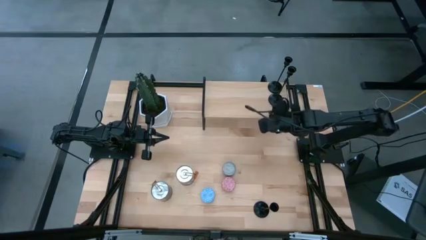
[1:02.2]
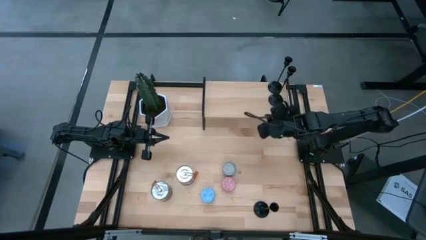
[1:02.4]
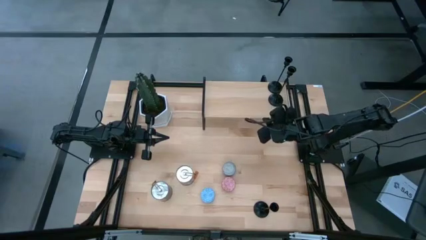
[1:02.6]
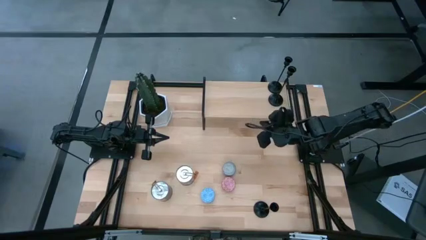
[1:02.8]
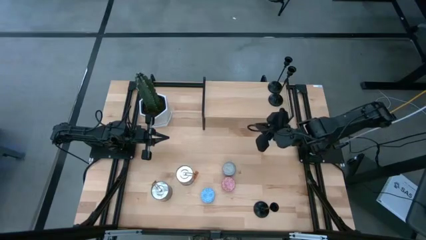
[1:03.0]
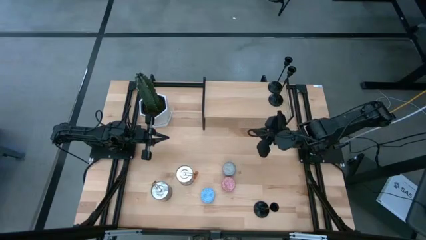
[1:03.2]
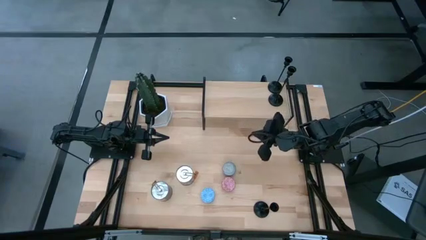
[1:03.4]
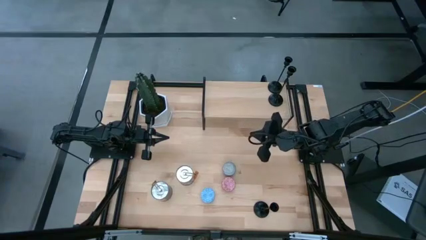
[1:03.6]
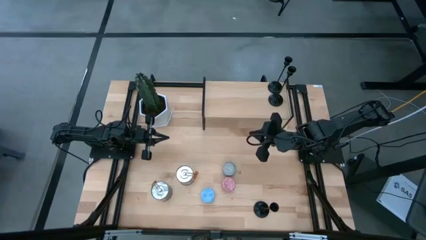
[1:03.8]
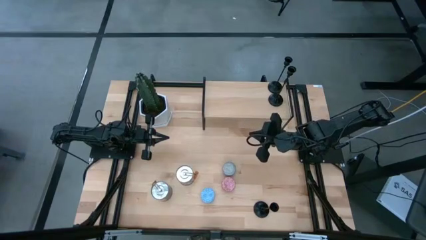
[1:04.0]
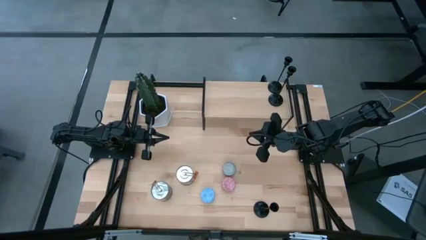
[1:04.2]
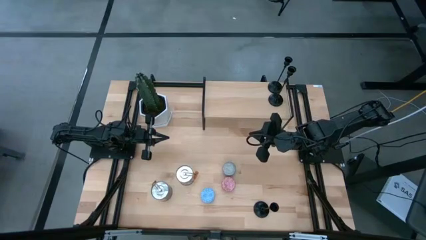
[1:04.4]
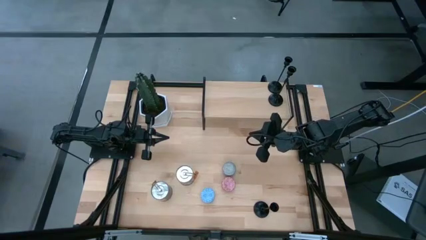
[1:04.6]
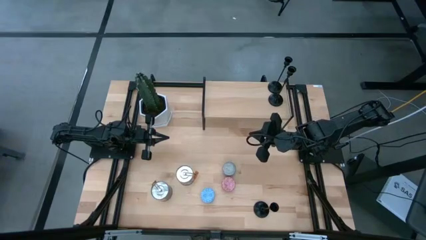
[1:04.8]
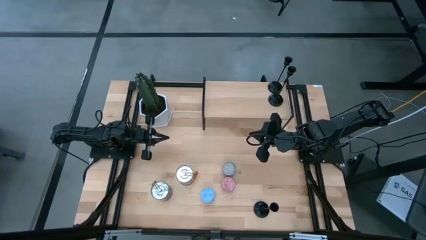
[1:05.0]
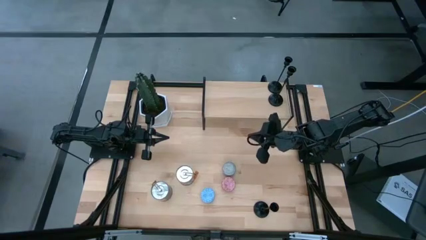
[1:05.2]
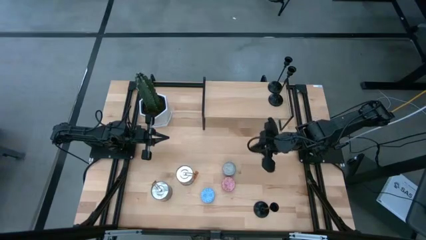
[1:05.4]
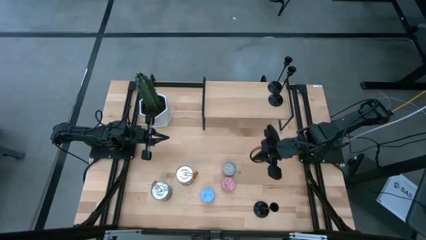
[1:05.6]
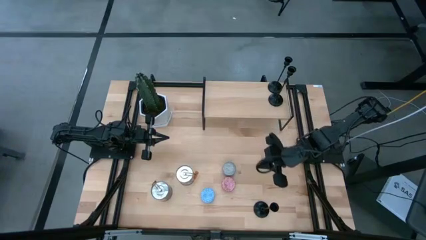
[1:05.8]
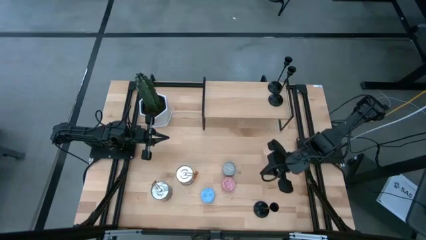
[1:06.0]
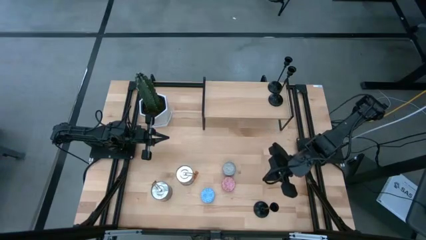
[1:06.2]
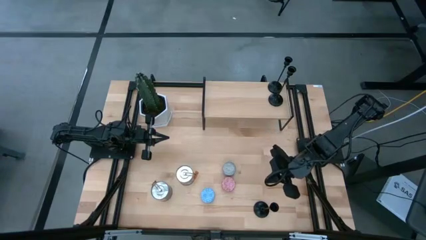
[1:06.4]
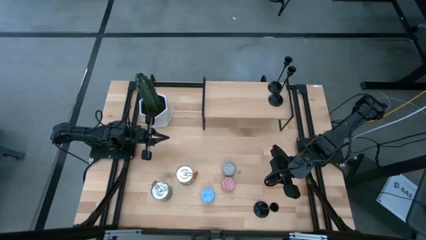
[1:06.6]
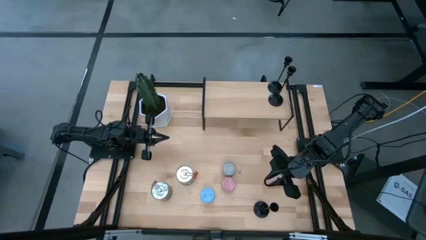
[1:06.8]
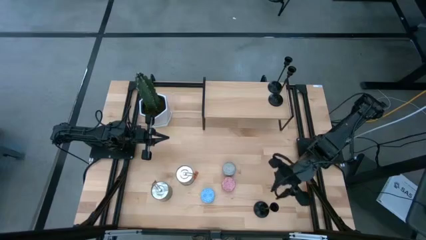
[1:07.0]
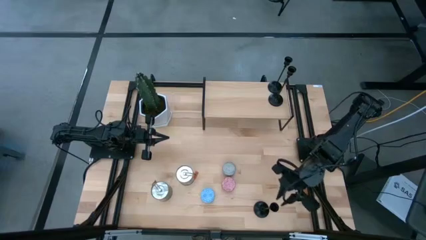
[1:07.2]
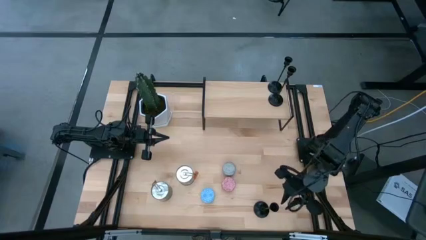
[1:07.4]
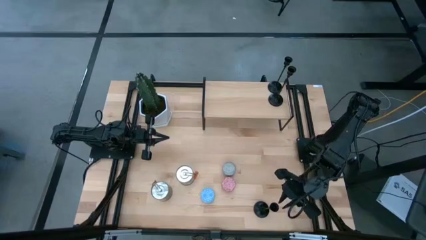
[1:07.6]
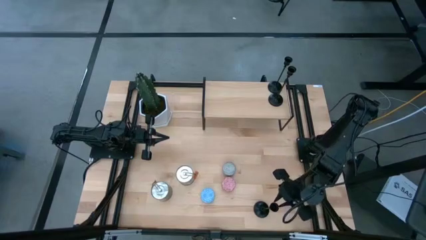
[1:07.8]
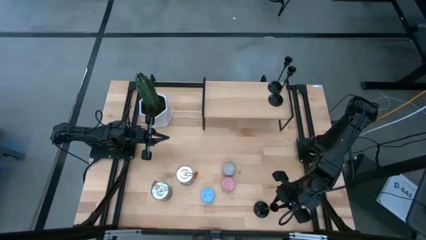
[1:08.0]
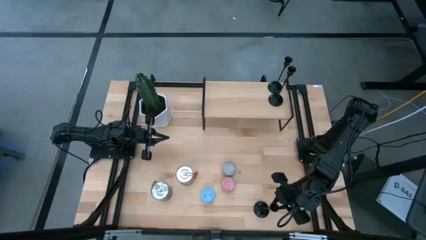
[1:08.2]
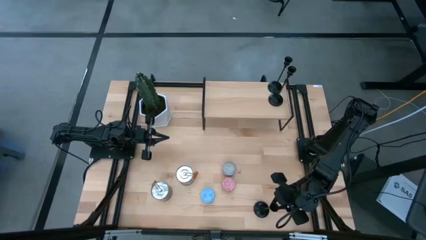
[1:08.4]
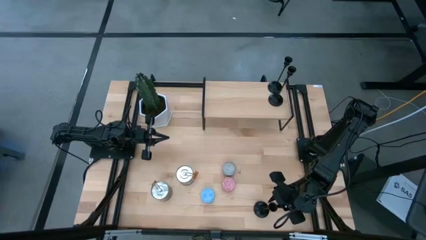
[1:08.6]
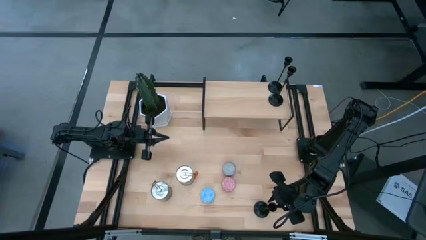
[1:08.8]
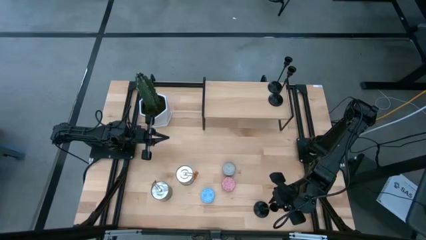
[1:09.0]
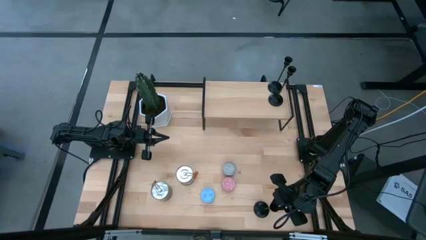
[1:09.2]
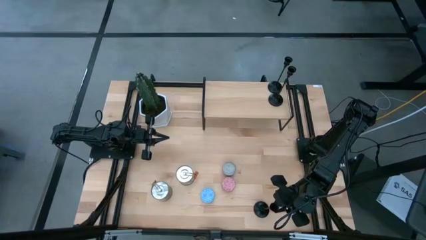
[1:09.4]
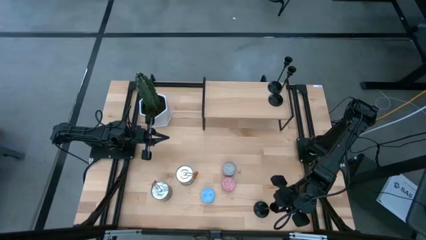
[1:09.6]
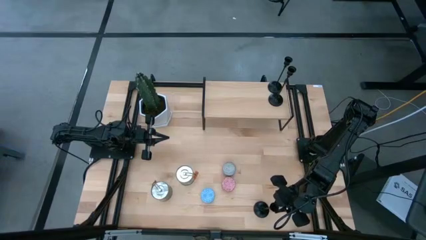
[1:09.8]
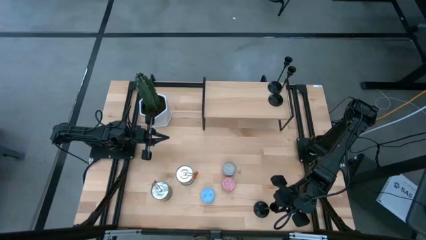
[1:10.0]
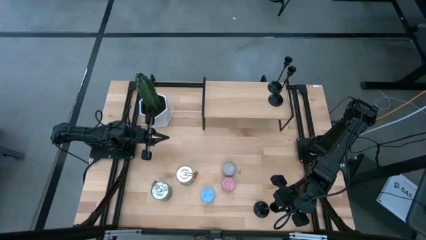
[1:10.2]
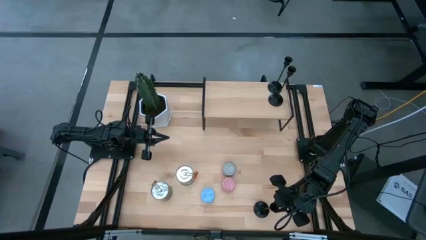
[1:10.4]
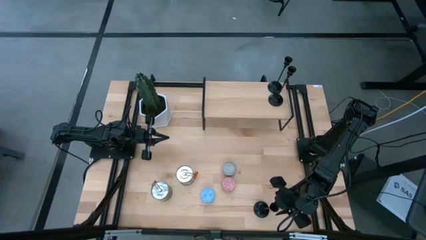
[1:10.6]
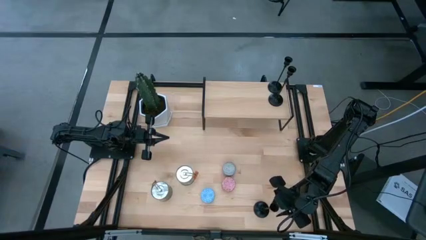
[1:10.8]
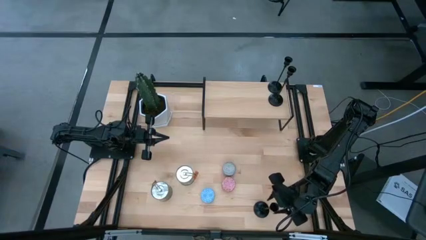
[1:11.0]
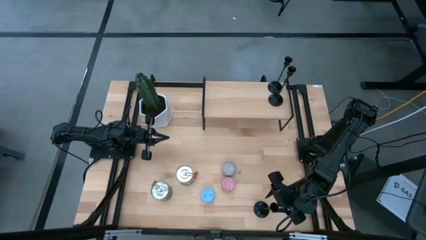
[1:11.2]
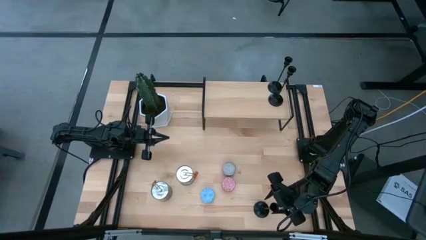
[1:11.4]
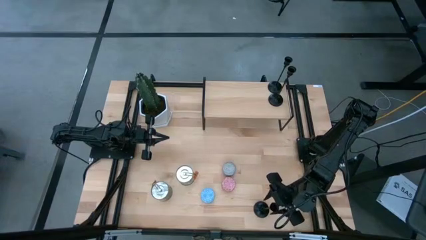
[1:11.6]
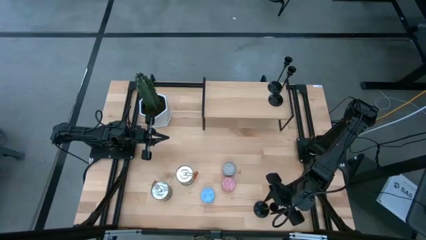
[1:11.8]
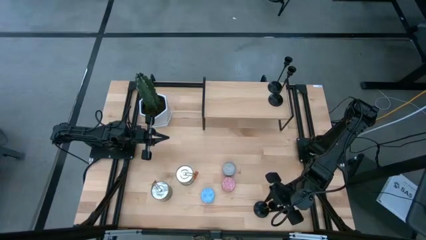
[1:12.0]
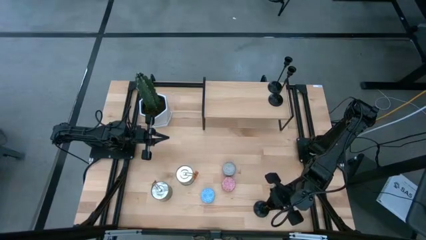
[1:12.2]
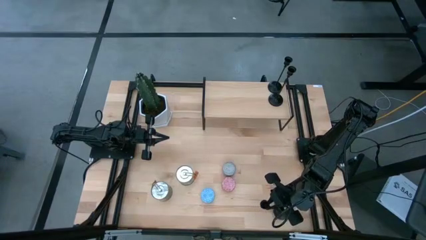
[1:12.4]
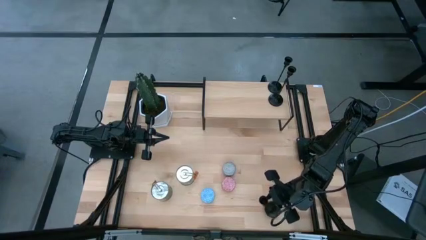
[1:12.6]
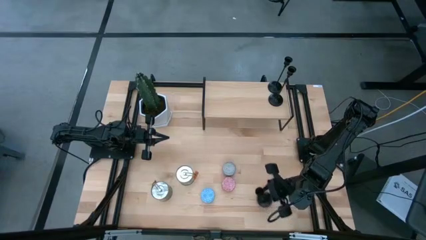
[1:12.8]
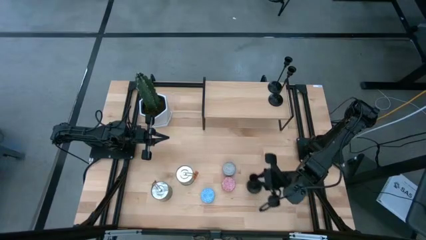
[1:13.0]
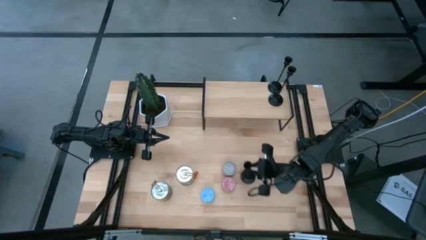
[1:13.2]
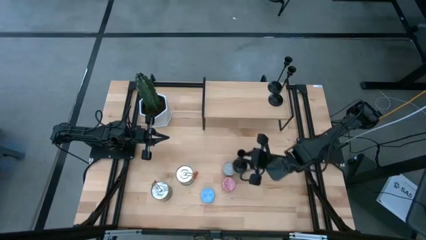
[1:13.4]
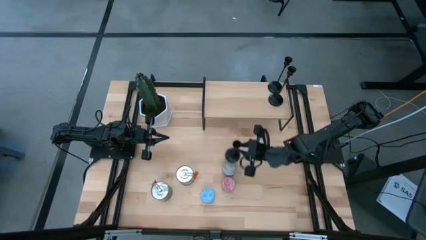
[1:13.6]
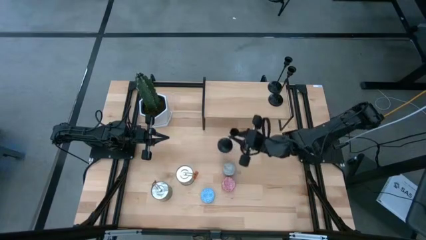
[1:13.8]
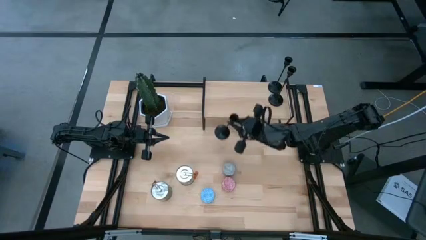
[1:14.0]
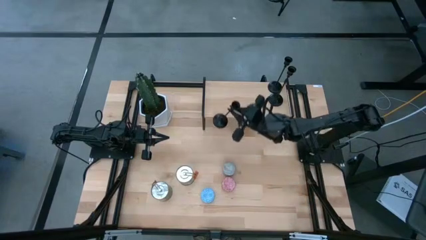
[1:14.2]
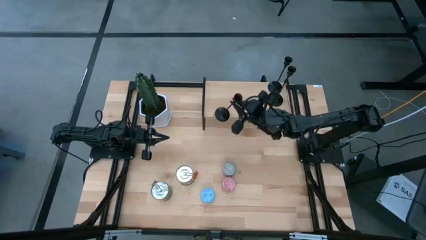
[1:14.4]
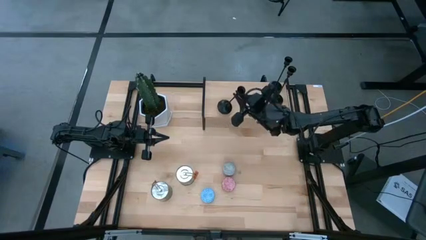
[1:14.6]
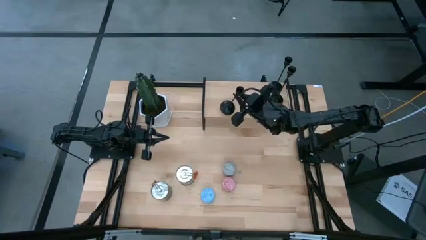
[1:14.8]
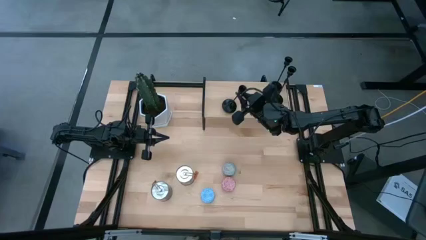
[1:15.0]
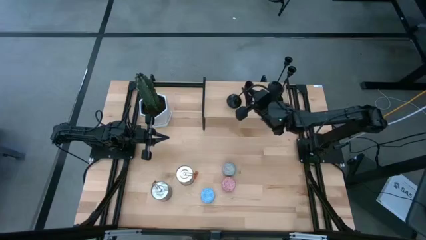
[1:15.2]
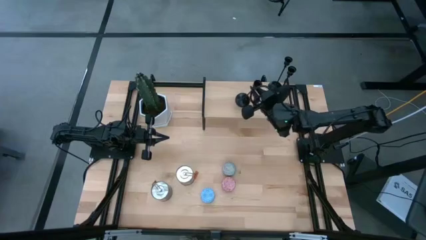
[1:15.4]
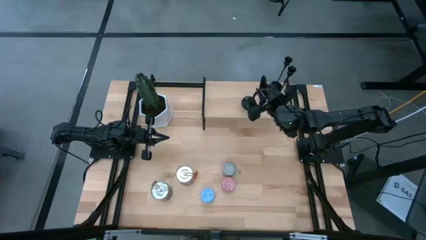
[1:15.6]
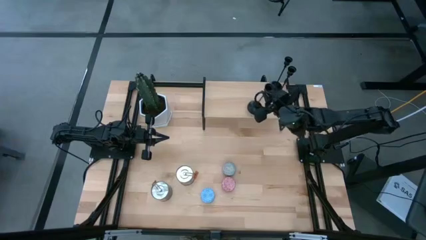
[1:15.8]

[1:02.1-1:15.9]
Task: Pick & Place candle stick holders
Put the black candle holder on the shelf

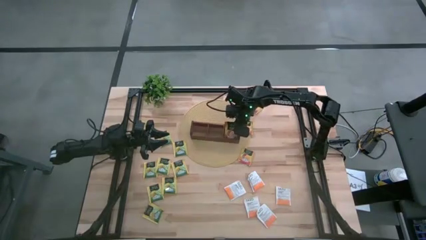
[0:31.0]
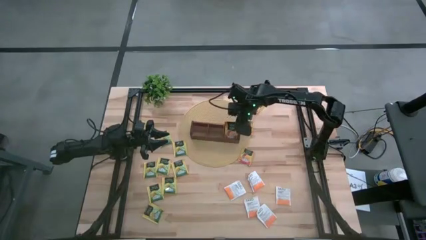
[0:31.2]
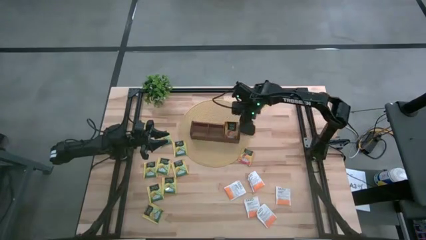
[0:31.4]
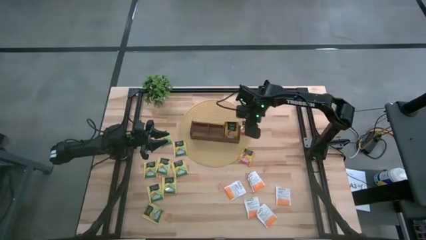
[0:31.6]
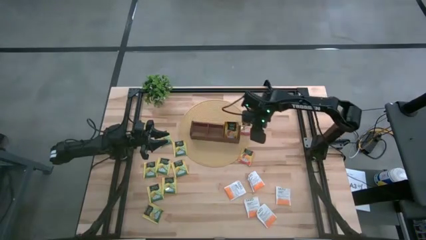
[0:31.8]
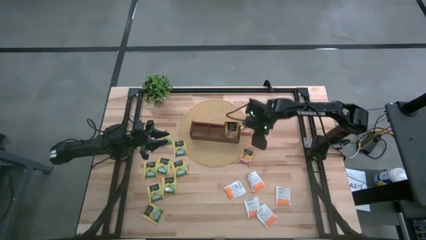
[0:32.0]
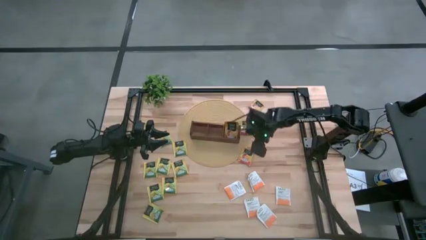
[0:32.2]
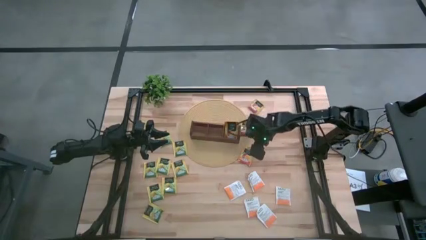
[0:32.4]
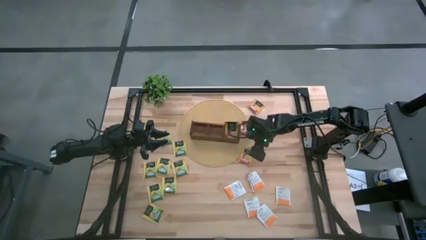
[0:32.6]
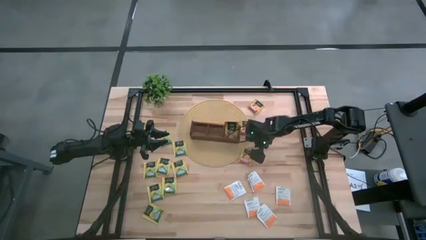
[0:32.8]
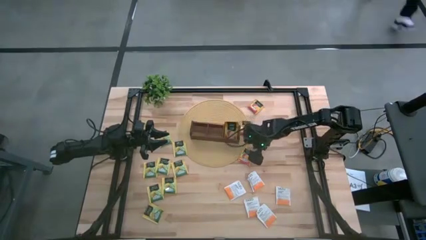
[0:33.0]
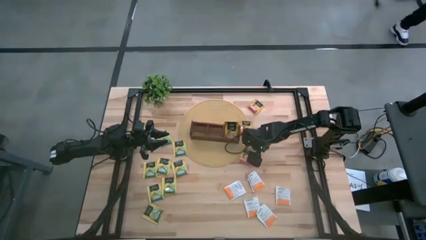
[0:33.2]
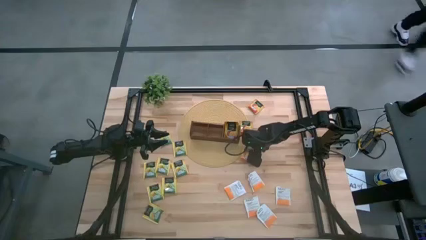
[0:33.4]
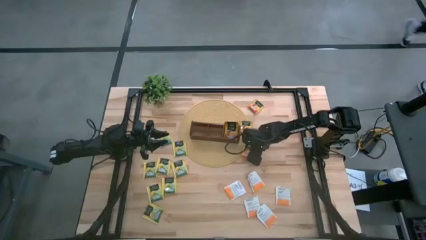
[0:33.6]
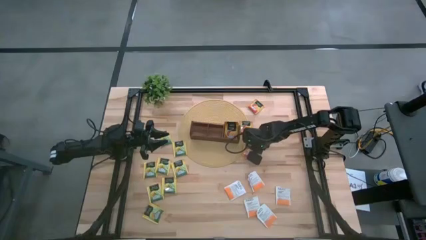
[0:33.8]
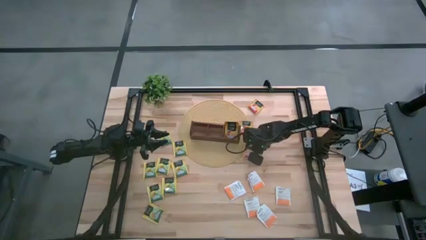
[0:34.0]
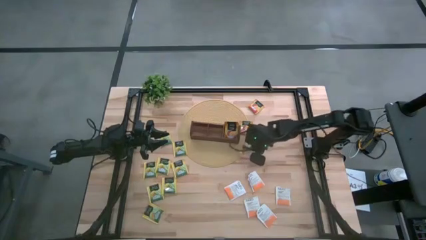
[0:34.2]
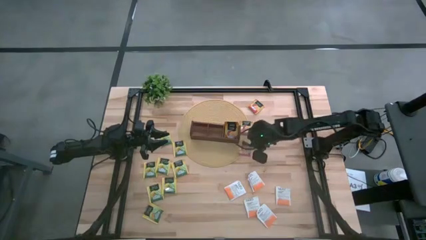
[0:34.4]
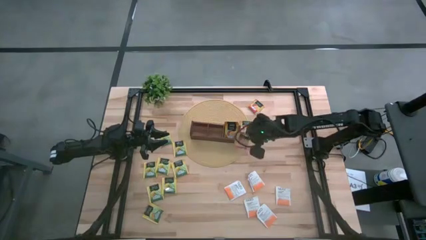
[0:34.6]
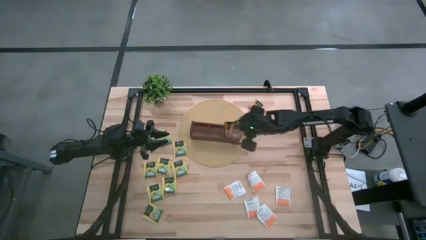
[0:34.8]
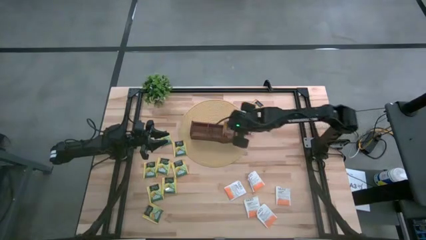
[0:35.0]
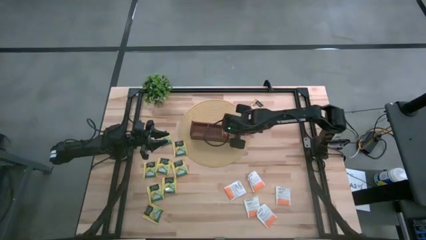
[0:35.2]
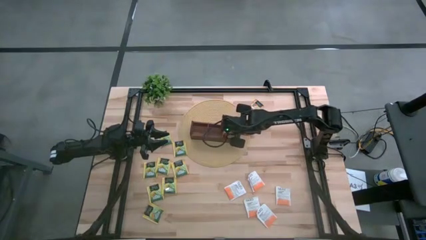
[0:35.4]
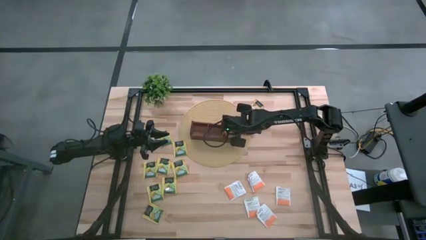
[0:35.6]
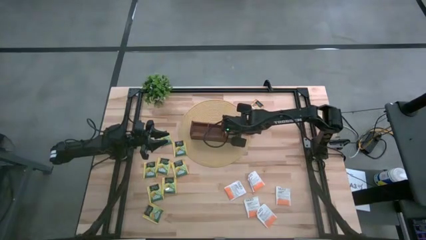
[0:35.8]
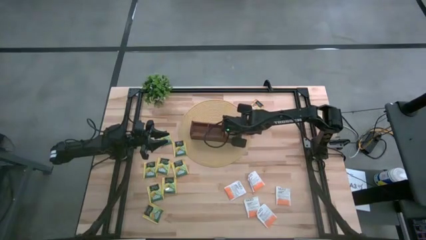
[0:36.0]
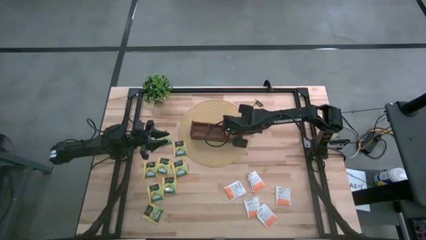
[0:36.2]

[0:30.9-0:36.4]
Task: Pick & Place Tea
Put the dark yellow tea bag into the right section of the wooden organizer
